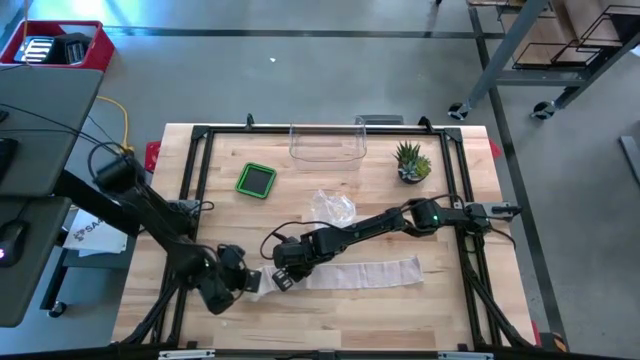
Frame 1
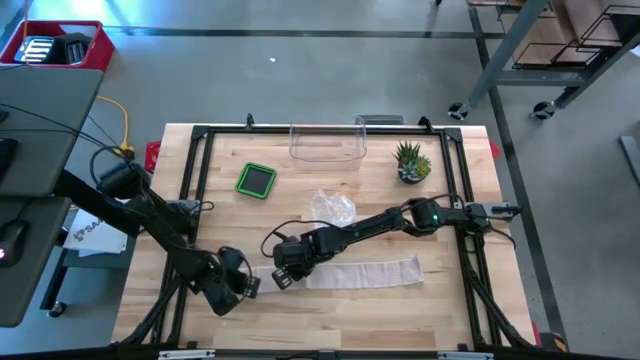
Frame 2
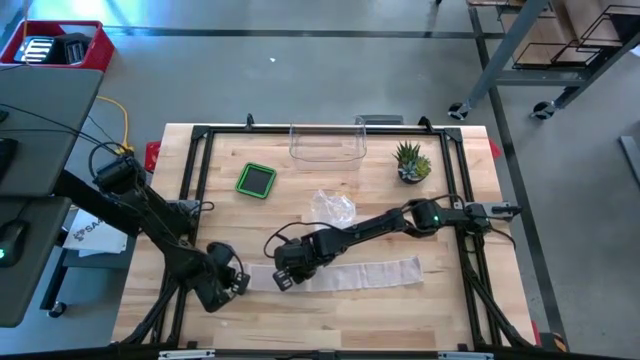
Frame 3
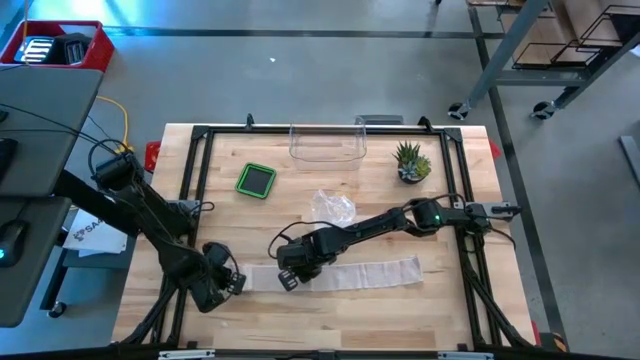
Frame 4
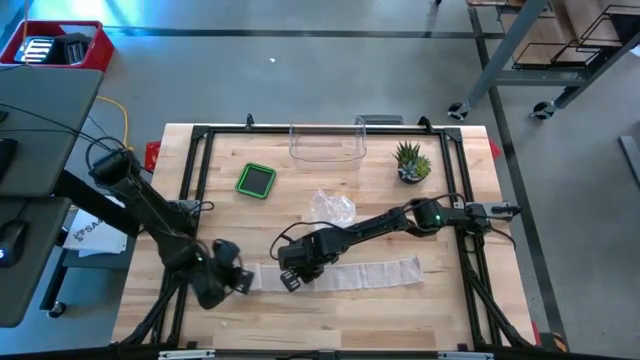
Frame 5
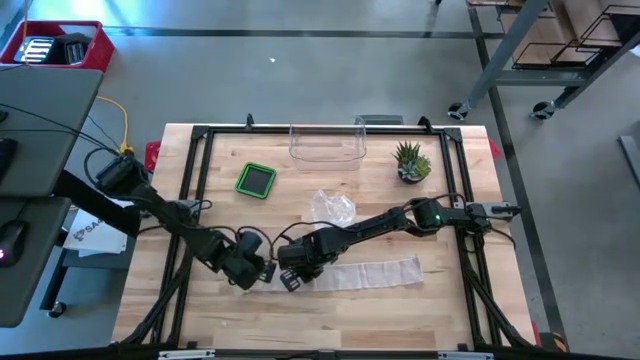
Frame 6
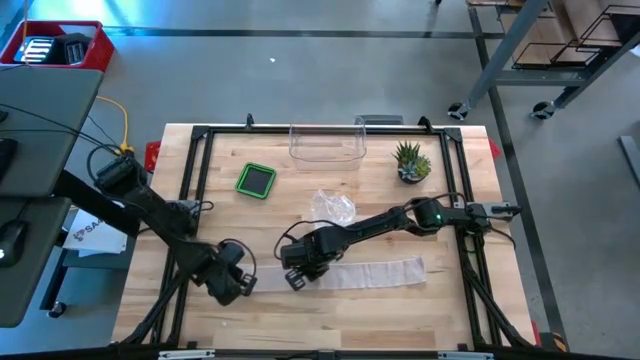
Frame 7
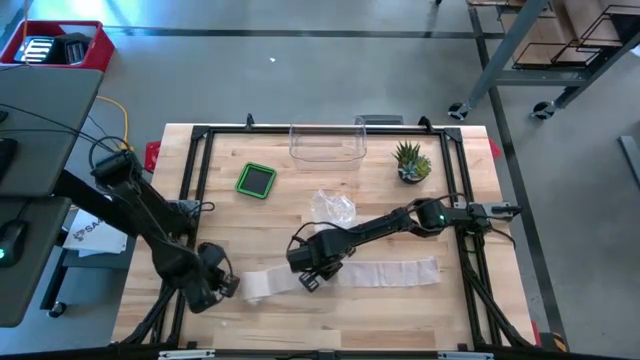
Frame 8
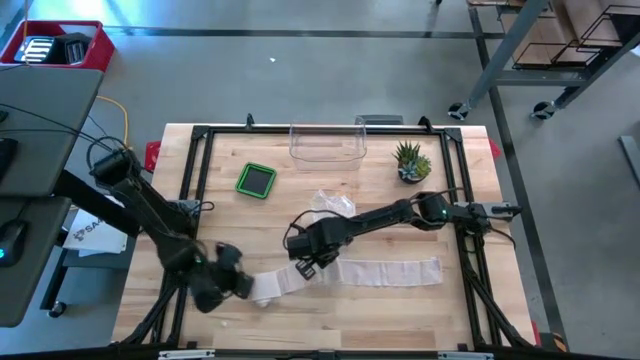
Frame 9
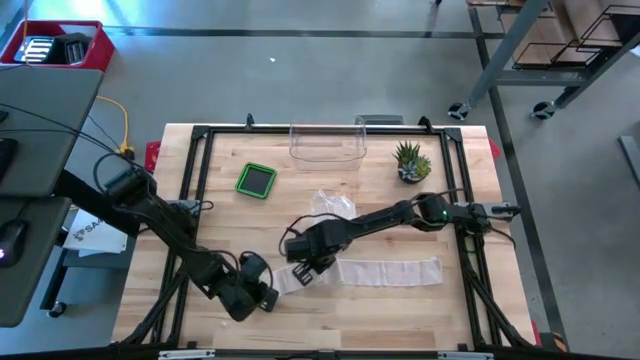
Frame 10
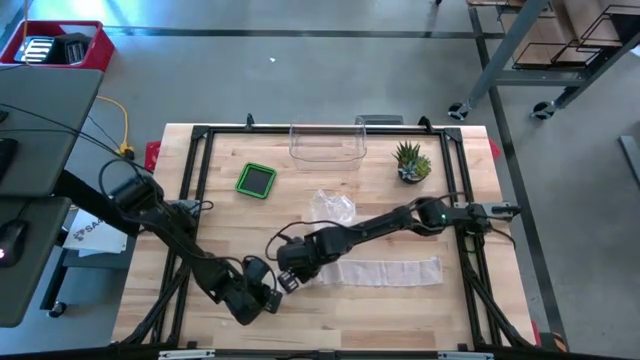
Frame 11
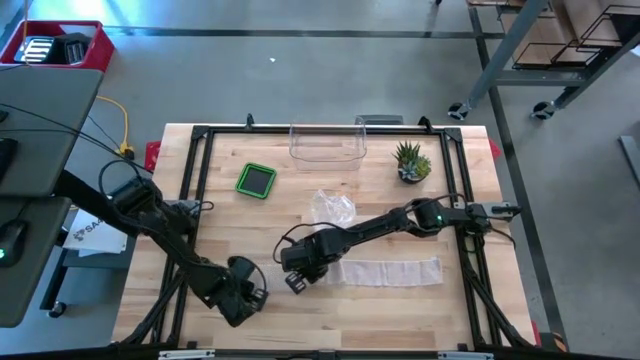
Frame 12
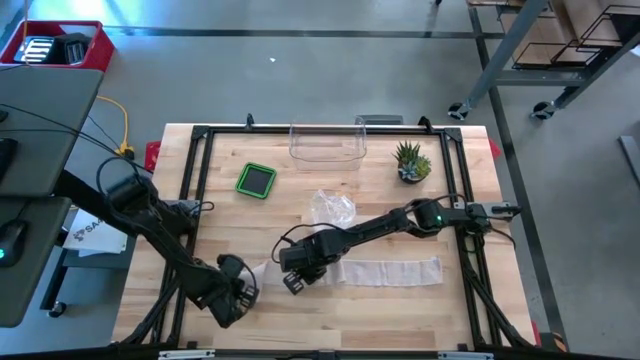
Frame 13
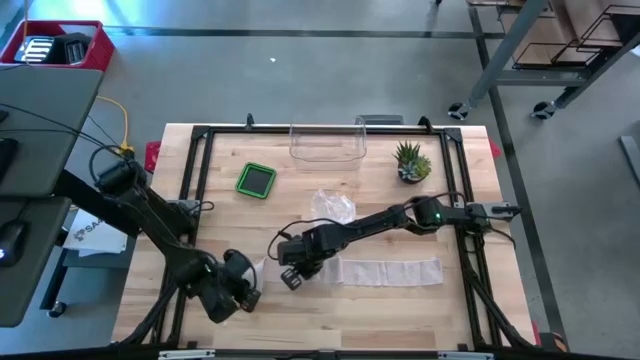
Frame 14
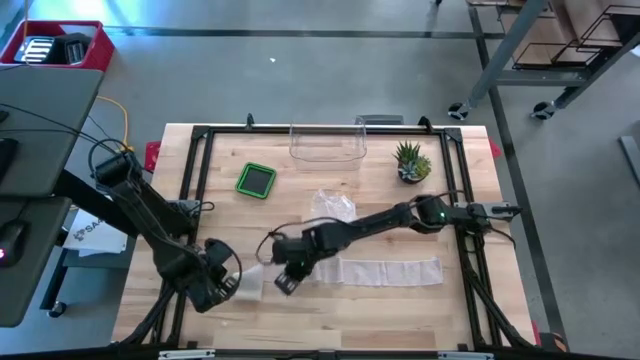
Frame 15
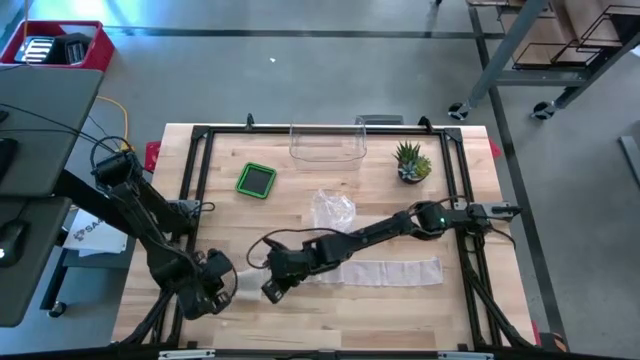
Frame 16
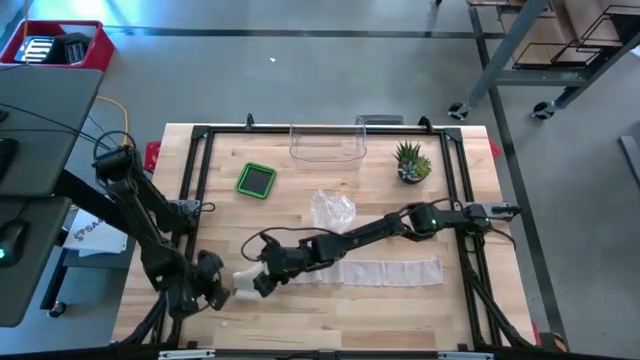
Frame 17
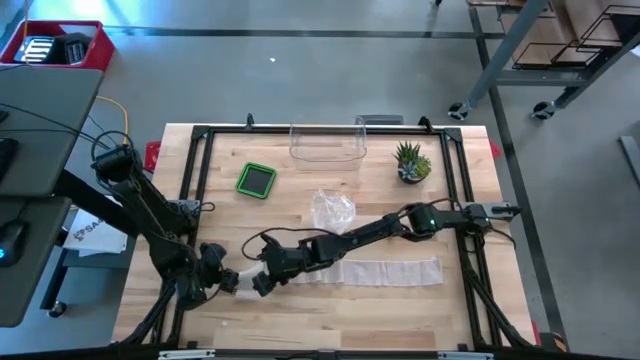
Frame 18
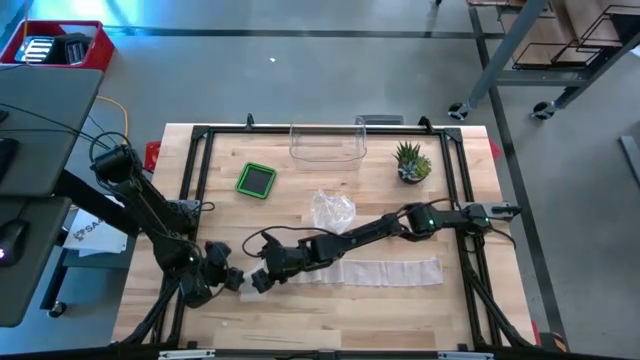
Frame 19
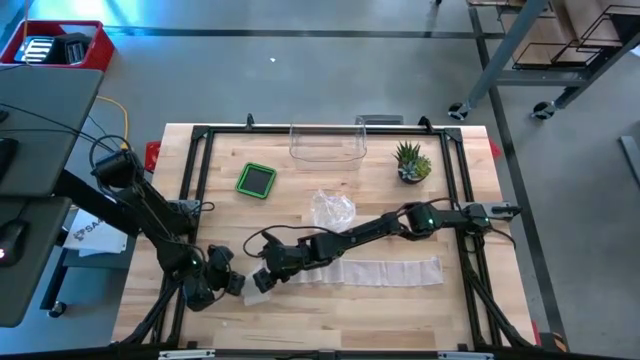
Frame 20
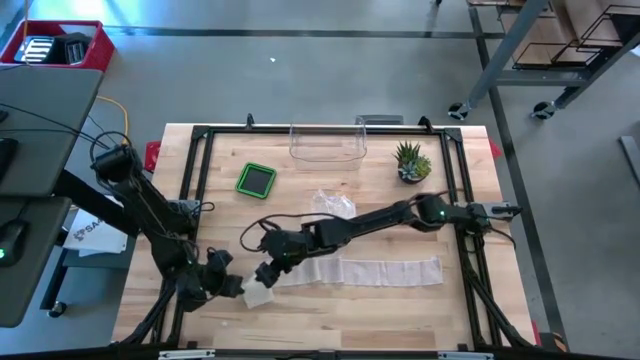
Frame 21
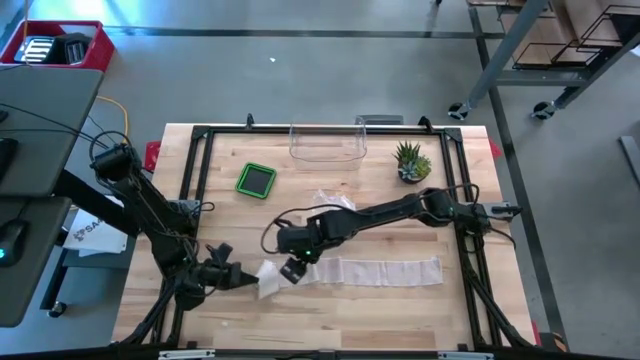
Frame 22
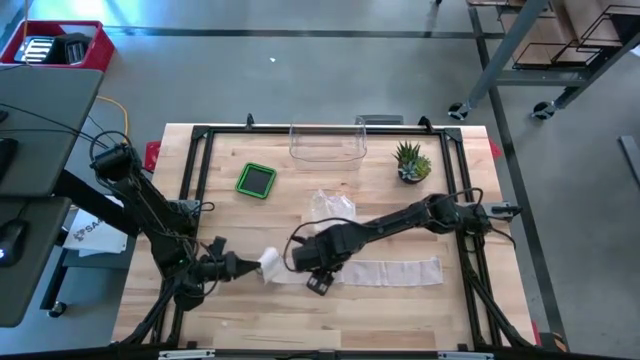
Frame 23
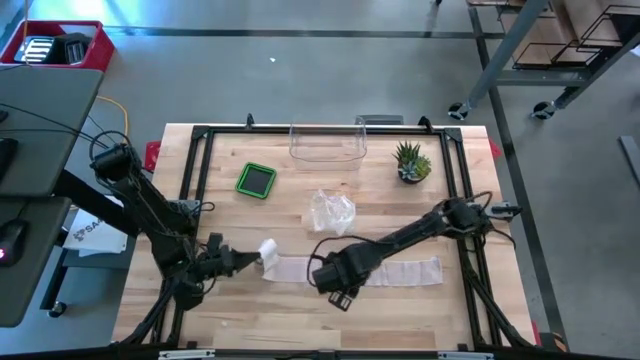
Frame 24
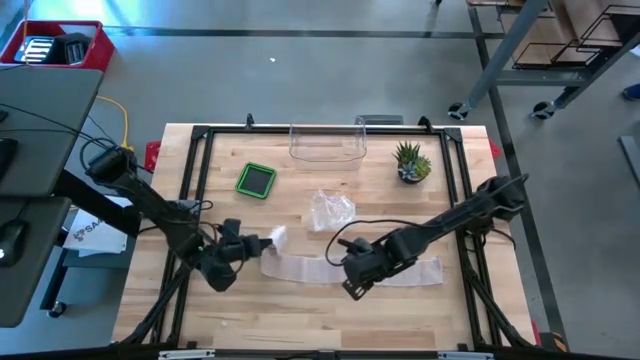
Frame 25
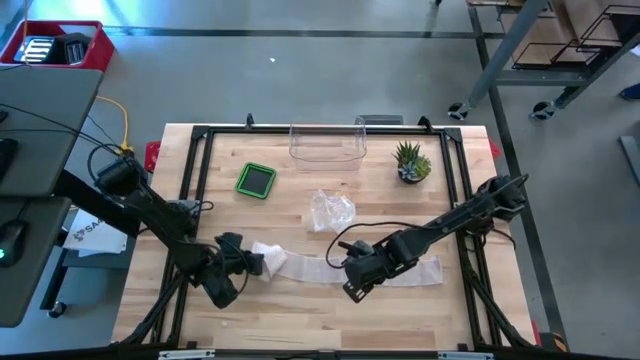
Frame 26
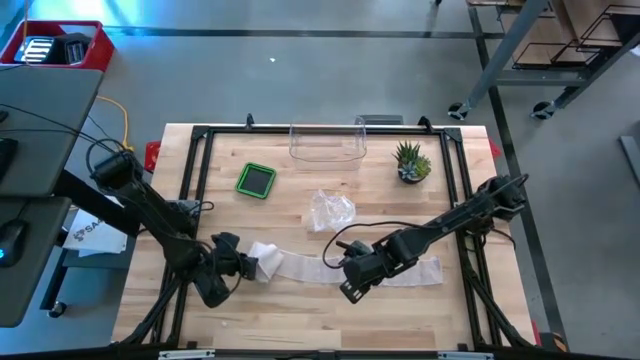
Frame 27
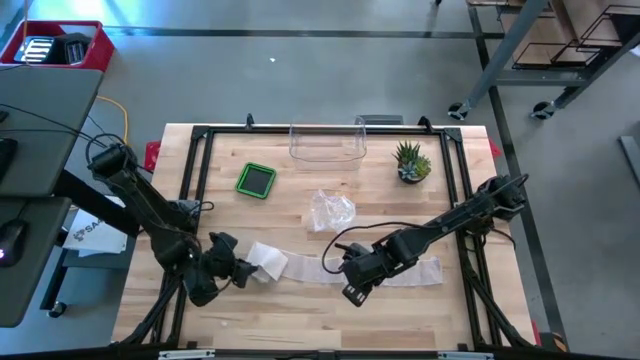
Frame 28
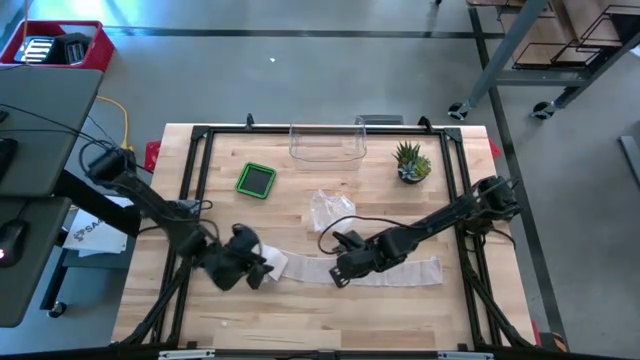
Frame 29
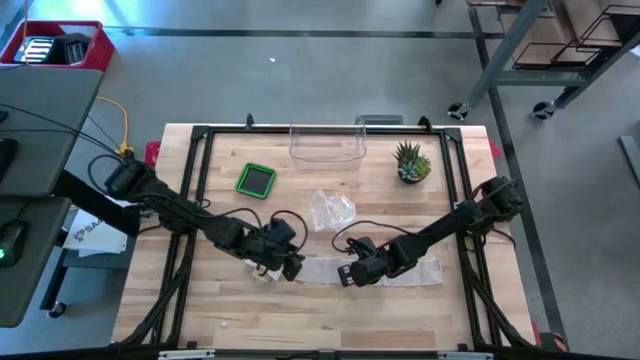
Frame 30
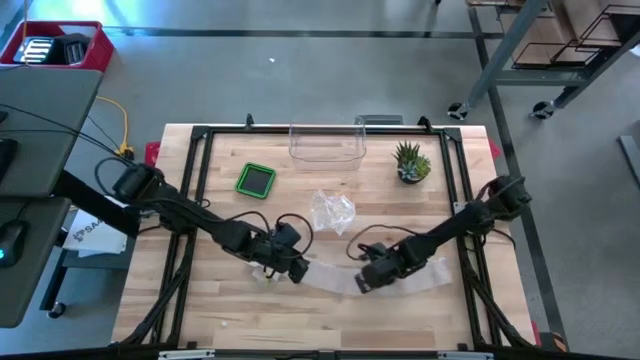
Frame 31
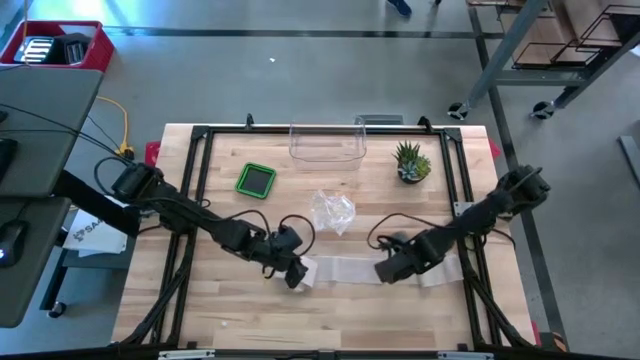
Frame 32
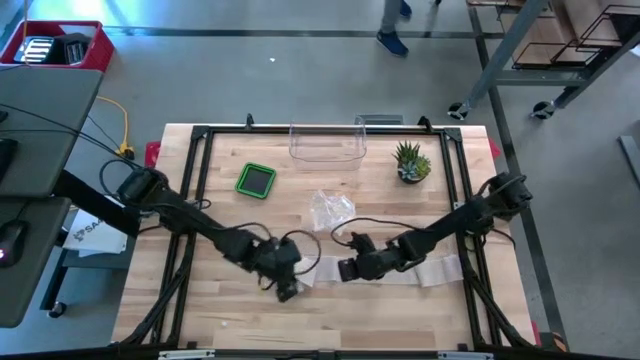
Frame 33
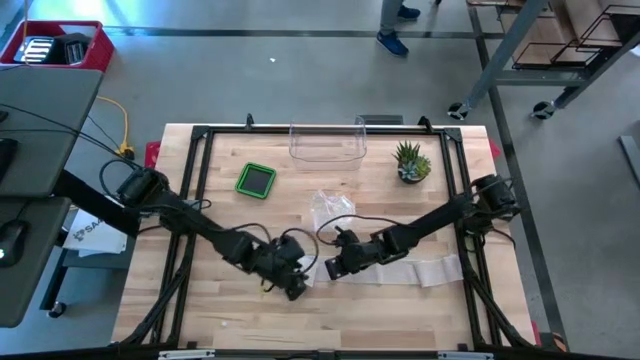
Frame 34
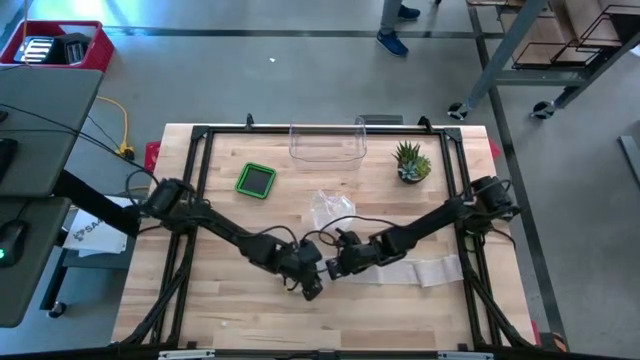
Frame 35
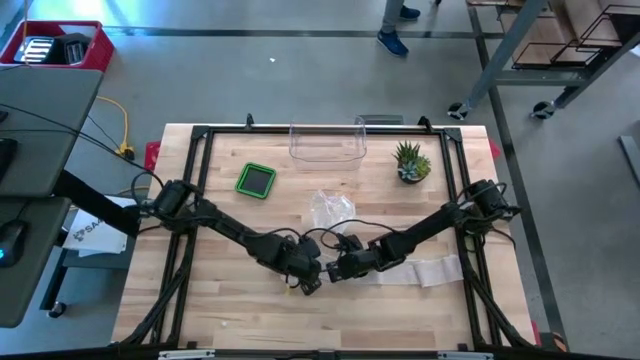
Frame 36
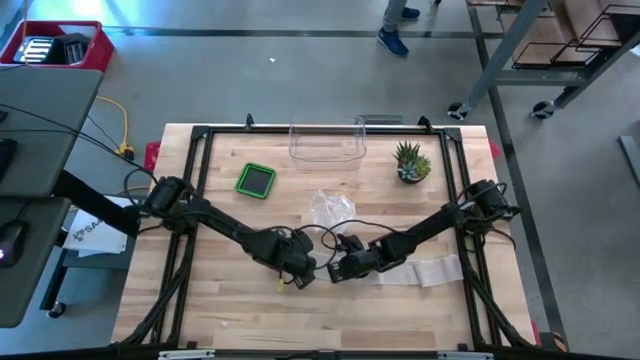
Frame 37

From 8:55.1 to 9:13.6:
Task: Roll bandage
Roll the bandage

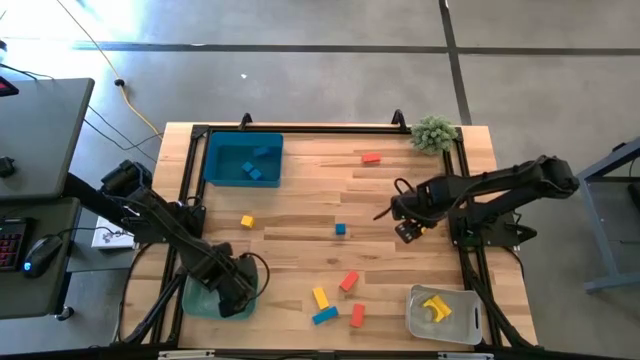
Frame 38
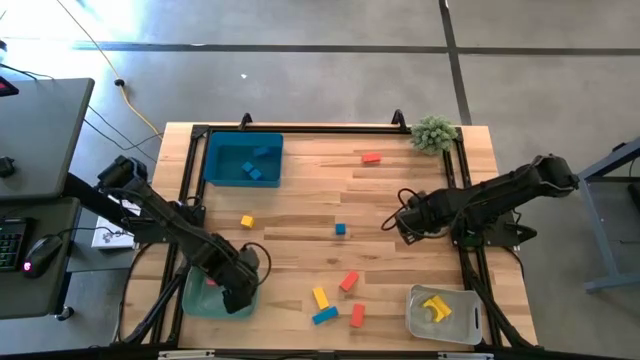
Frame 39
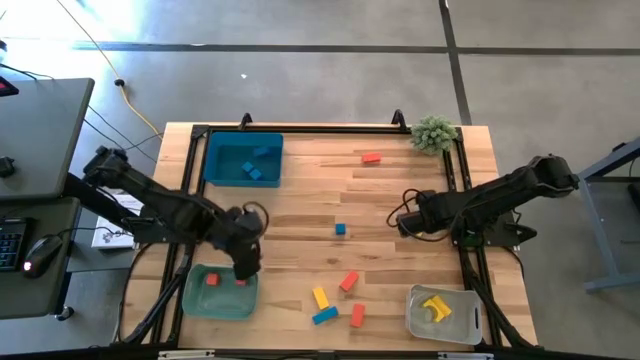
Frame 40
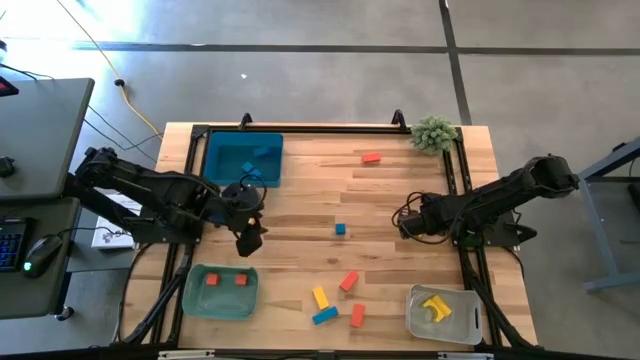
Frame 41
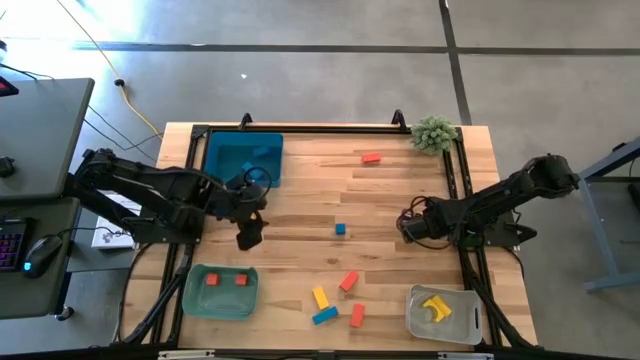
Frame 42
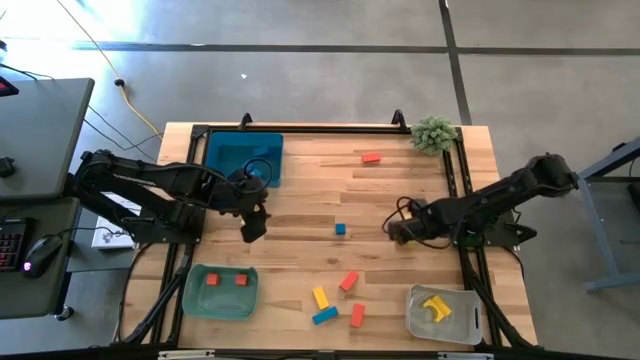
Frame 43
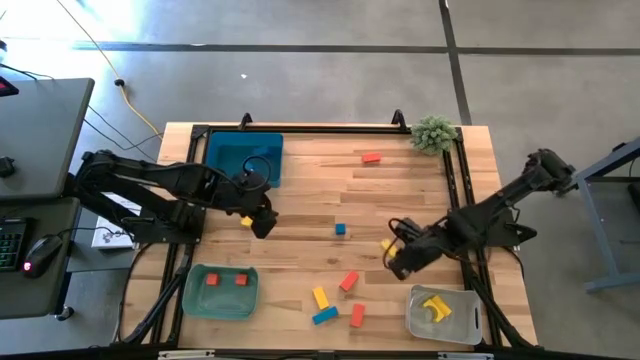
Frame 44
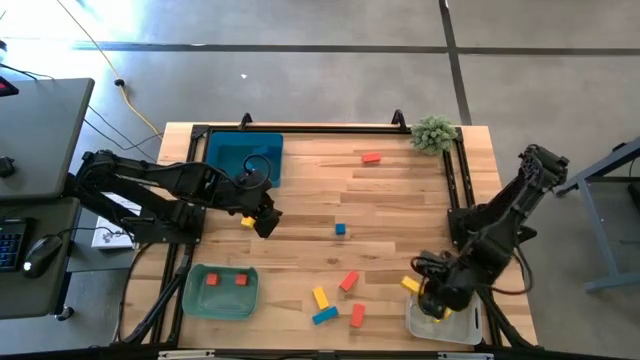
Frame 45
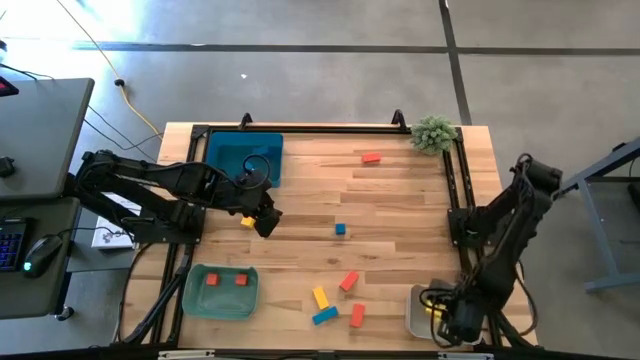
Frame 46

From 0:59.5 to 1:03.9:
Task: Sort & place blocks by color
Put the yellow block into the gray bin
